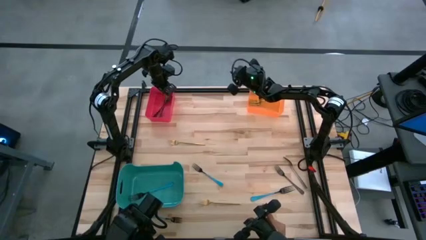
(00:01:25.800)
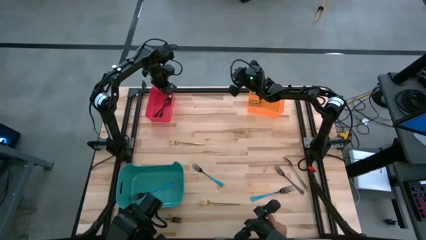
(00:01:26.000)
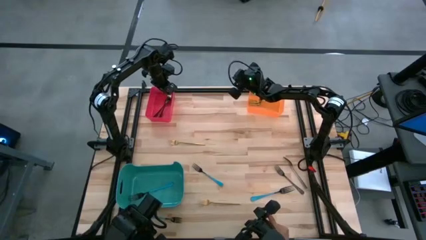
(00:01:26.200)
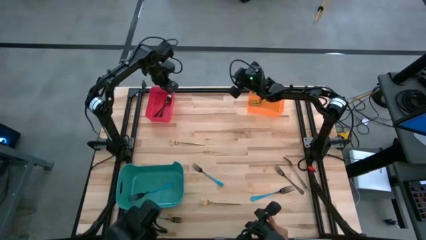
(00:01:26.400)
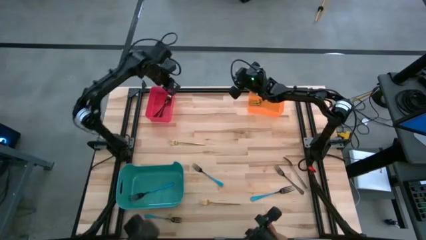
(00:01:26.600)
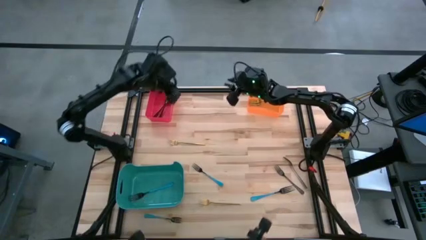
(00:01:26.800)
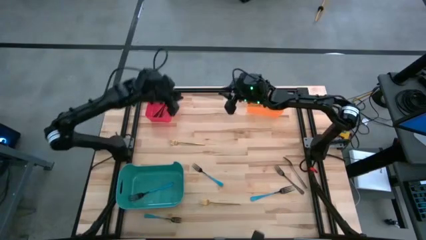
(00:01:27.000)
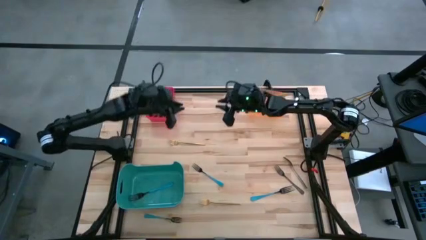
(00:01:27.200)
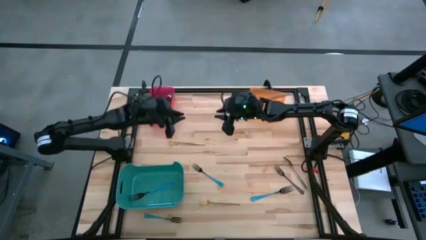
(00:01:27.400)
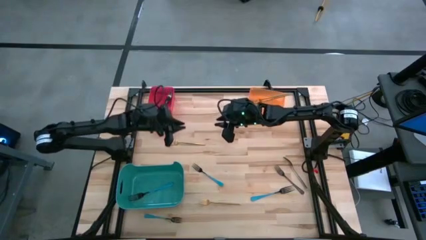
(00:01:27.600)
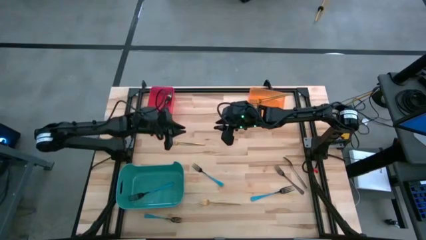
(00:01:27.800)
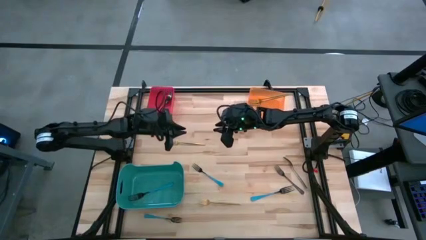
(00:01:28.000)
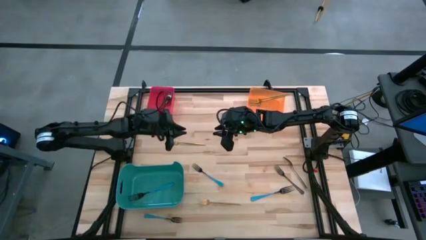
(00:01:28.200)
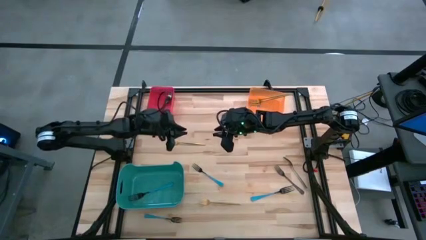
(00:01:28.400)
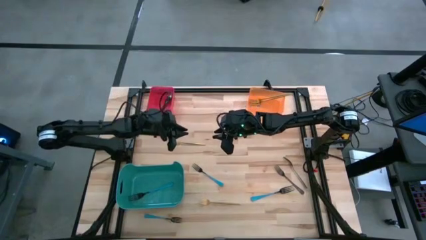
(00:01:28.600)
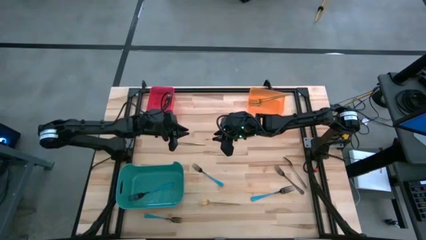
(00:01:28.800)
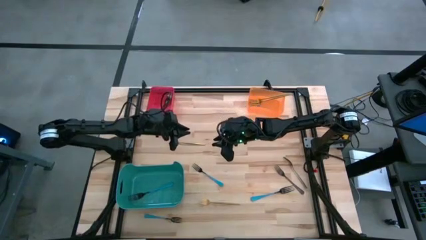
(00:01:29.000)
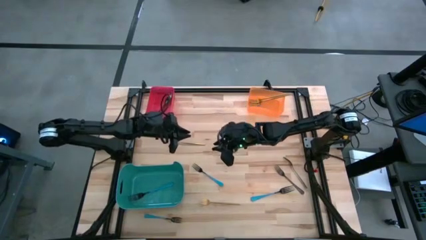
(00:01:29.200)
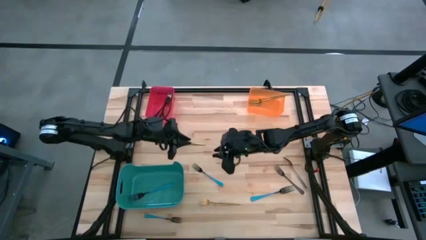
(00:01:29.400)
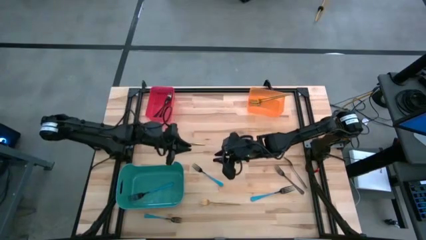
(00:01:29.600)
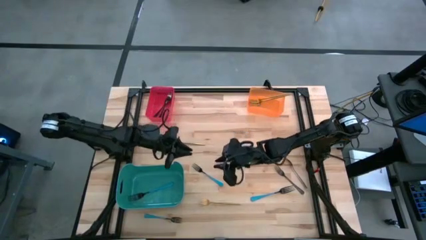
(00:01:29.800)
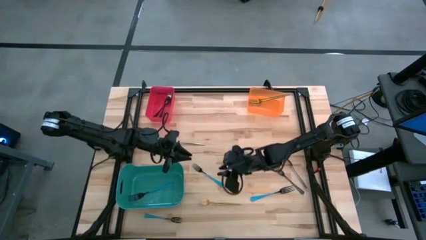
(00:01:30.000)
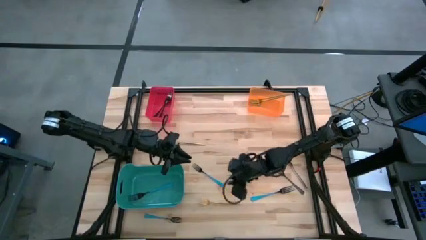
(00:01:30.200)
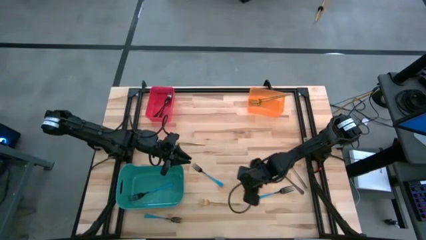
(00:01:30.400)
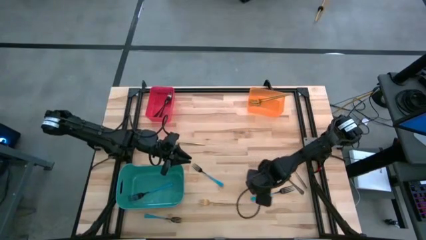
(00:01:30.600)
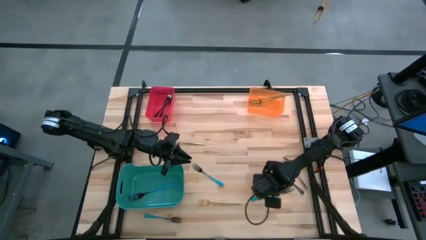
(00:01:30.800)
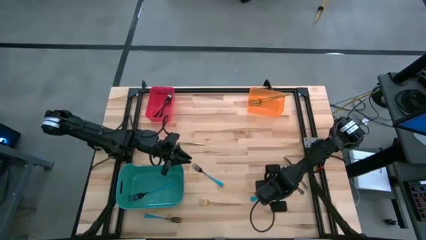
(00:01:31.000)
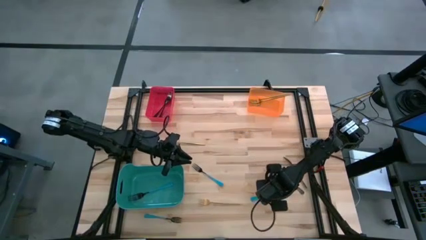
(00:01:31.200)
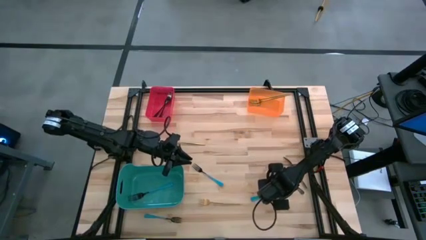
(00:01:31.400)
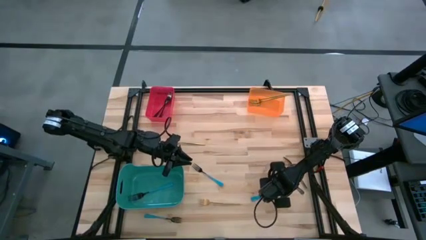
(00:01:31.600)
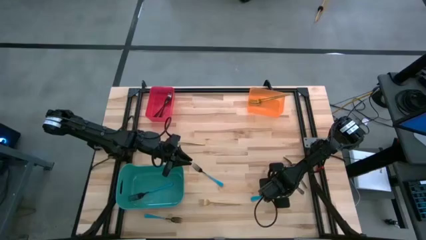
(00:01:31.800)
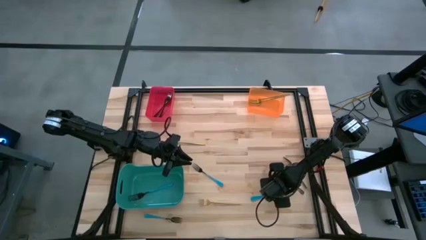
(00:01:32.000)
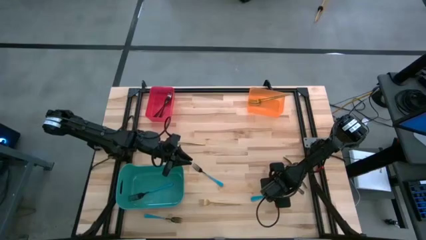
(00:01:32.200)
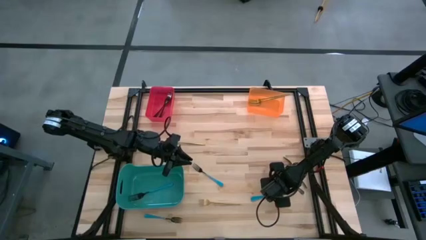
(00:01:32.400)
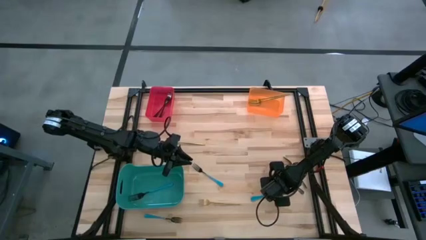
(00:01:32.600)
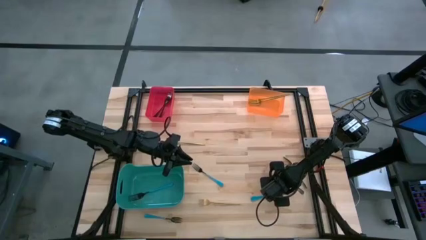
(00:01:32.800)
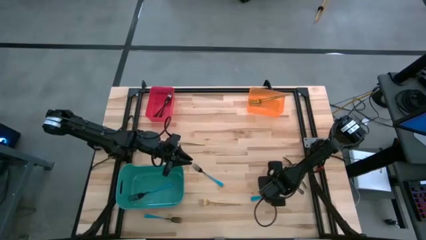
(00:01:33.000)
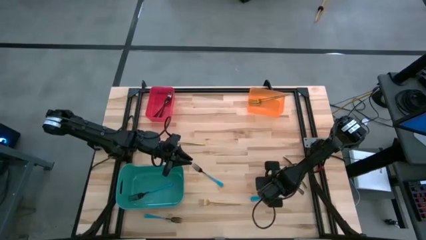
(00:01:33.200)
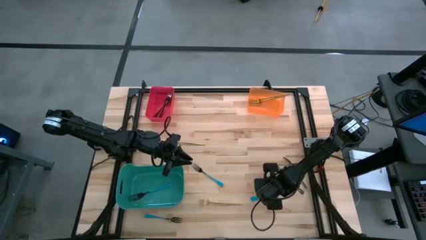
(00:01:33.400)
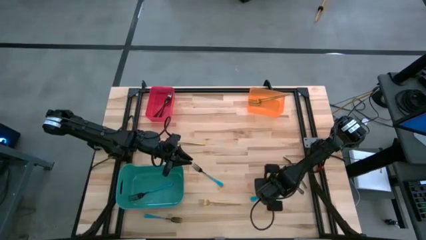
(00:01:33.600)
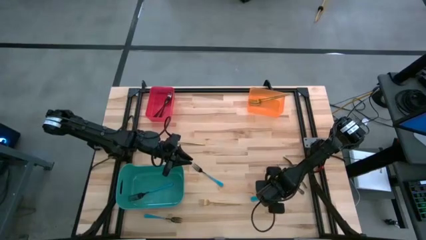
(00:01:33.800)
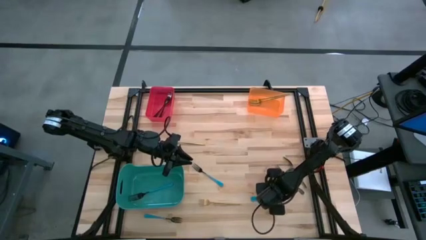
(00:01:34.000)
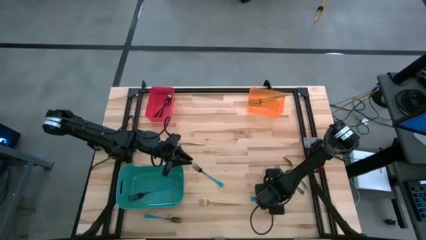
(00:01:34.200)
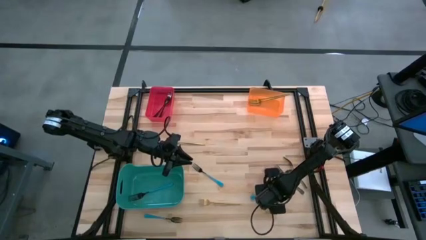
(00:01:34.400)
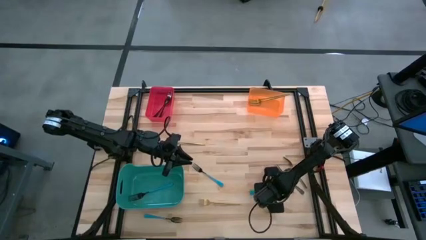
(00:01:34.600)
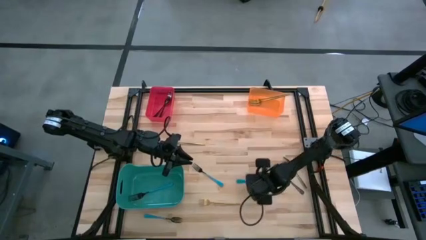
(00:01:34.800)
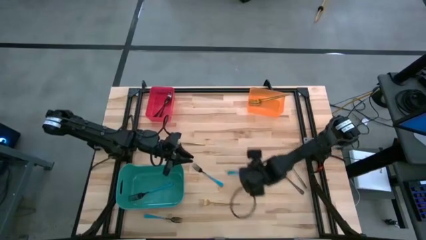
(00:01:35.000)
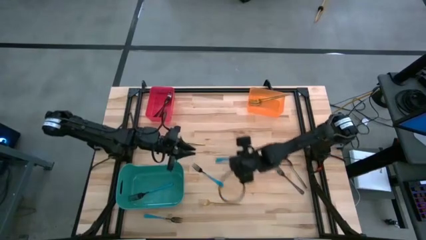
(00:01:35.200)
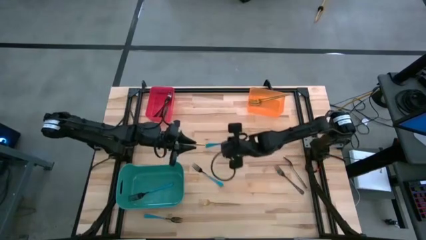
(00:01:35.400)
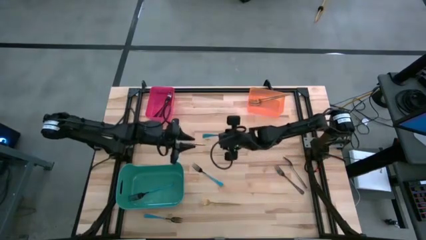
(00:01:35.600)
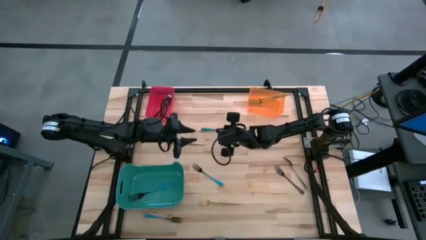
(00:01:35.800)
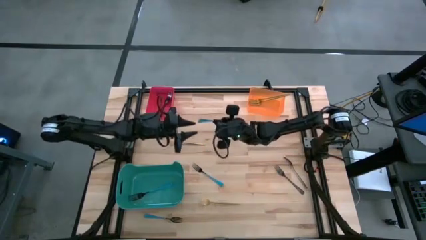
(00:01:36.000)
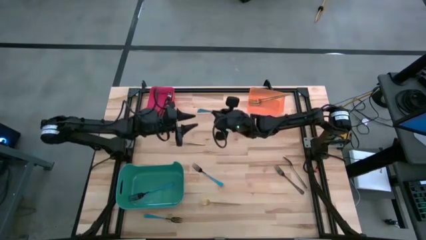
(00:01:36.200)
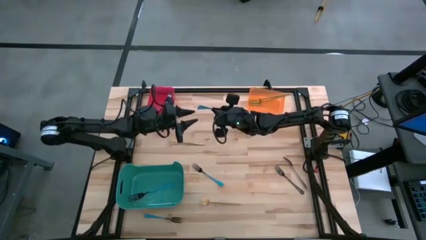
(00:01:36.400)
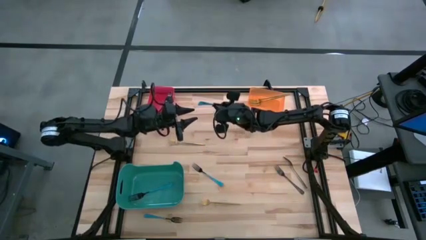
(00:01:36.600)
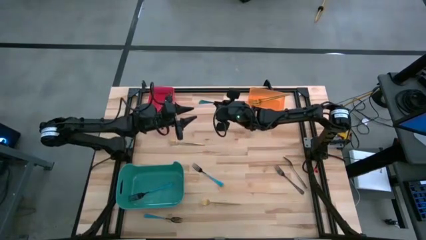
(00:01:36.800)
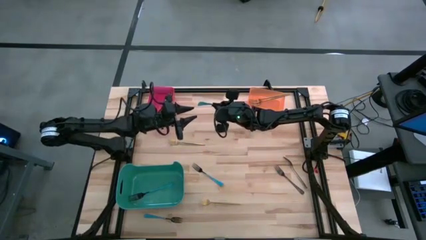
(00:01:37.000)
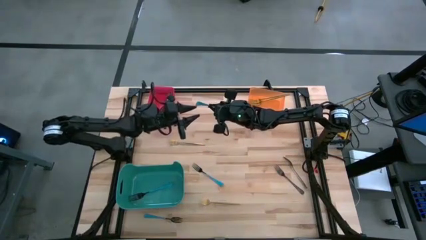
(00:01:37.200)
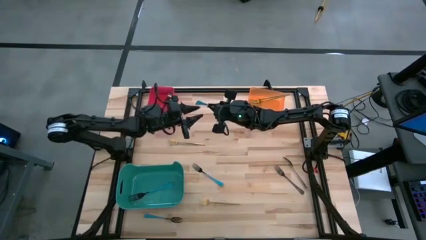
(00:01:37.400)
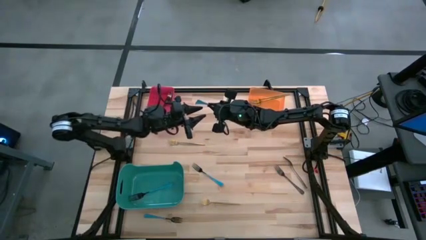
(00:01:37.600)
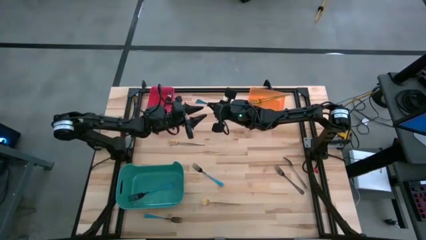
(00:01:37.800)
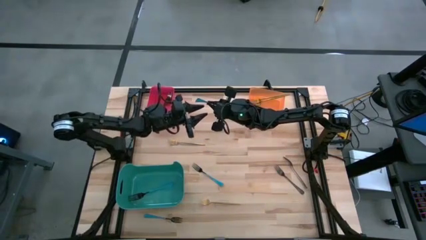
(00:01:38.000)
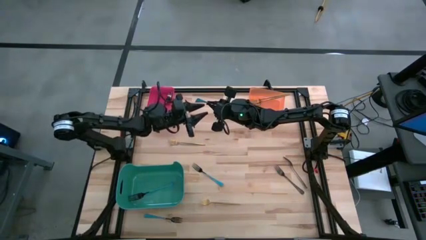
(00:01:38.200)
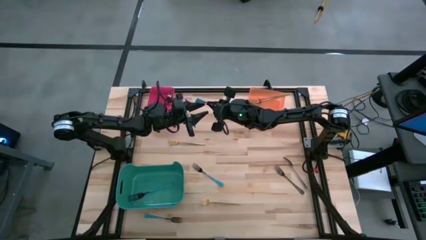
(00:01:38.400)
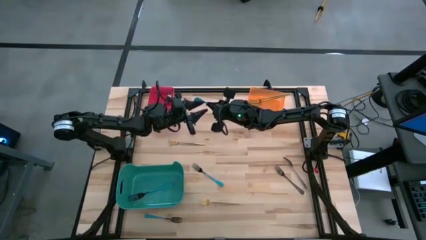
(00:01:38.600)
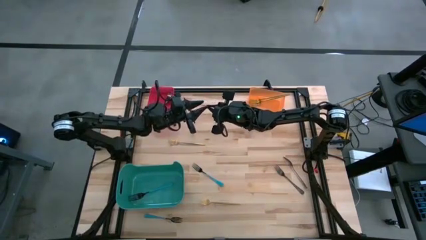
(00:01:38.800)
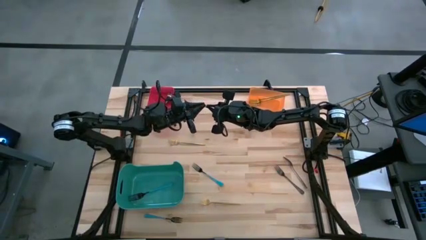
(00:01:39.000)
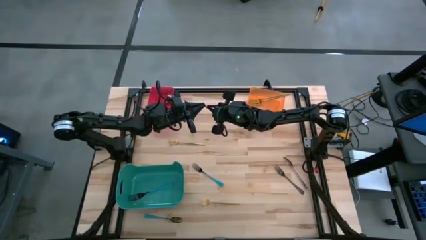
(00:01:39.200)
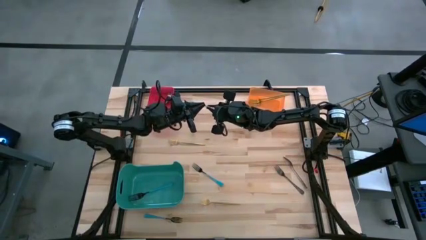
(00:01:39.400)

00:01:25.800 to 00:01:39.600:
Task: Sort silverware by color (type)
Put the blue fork into the blue bin
